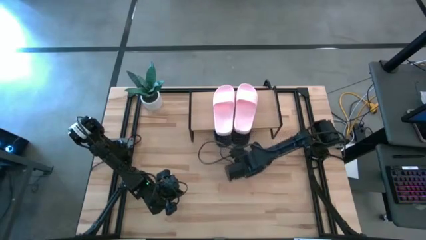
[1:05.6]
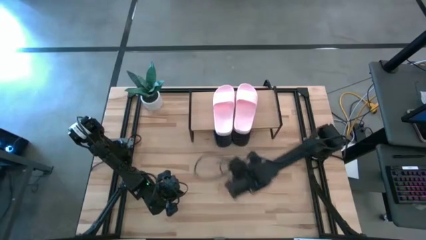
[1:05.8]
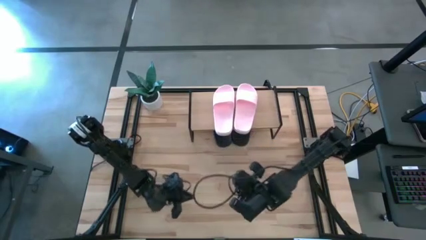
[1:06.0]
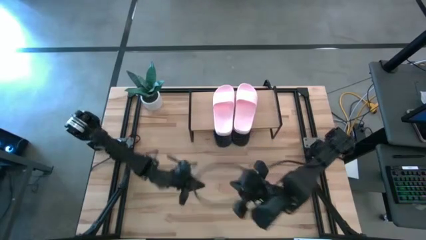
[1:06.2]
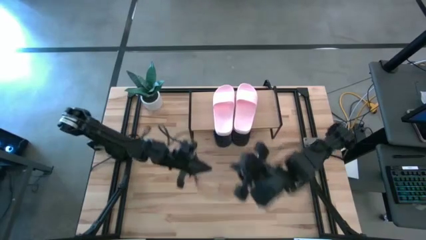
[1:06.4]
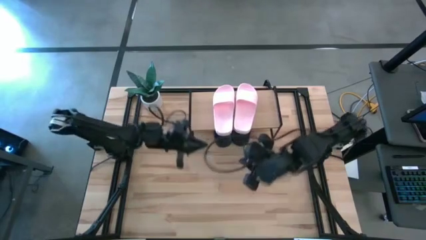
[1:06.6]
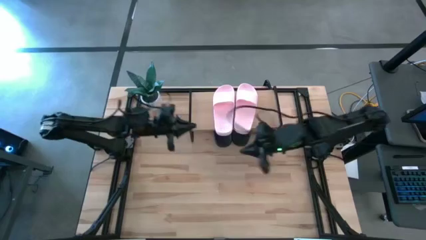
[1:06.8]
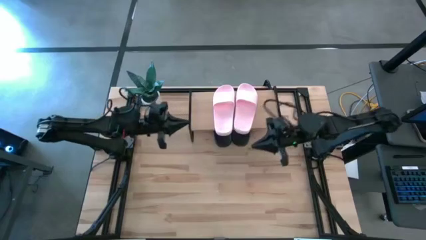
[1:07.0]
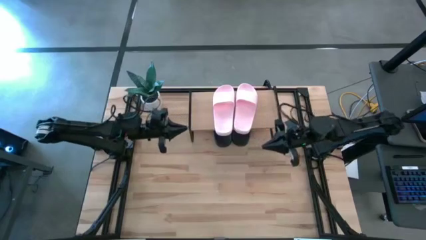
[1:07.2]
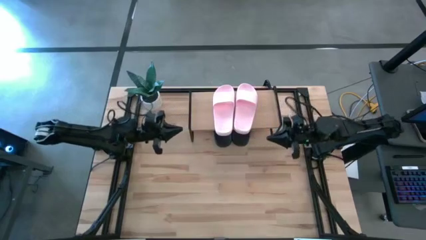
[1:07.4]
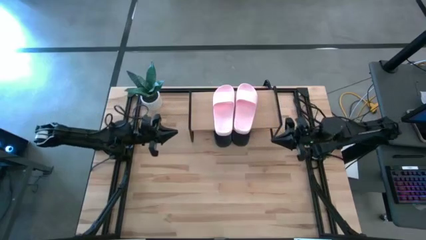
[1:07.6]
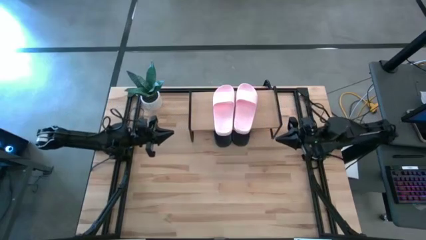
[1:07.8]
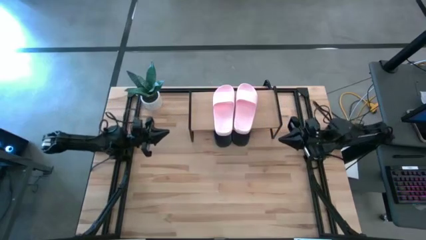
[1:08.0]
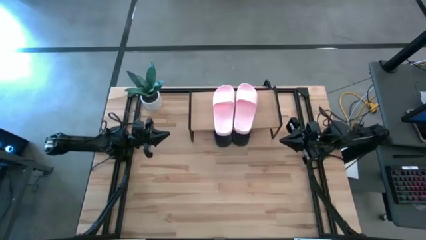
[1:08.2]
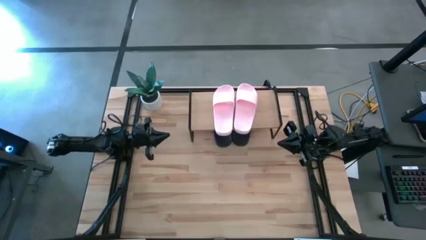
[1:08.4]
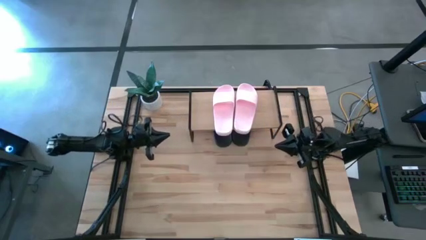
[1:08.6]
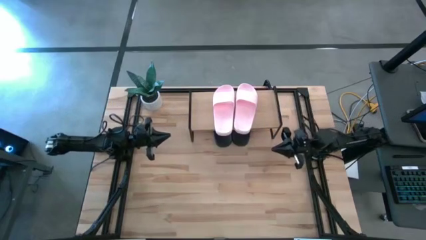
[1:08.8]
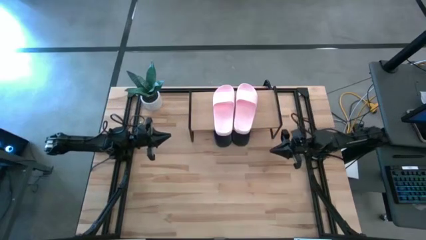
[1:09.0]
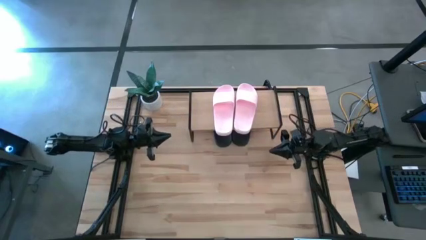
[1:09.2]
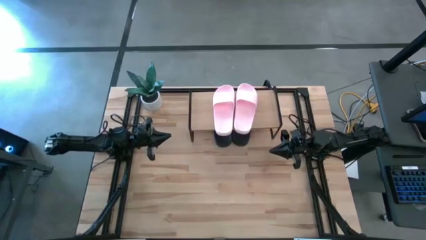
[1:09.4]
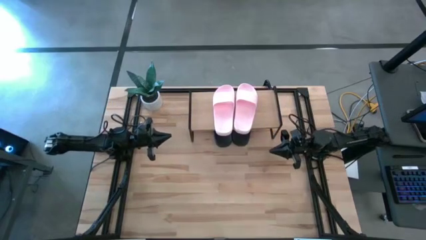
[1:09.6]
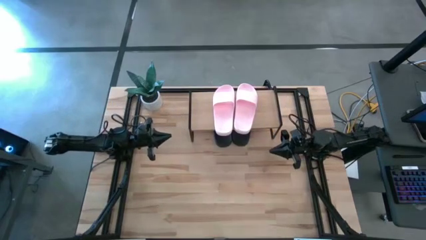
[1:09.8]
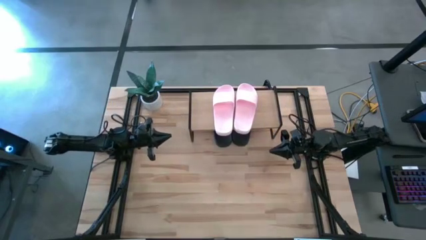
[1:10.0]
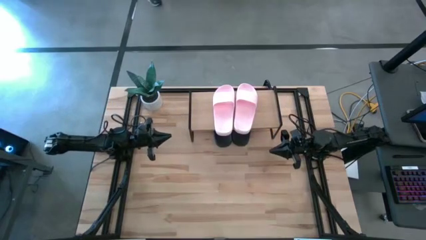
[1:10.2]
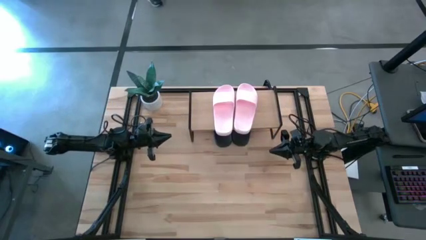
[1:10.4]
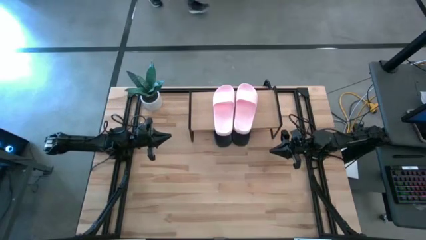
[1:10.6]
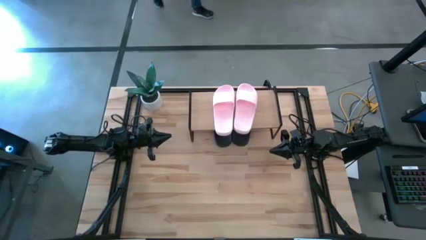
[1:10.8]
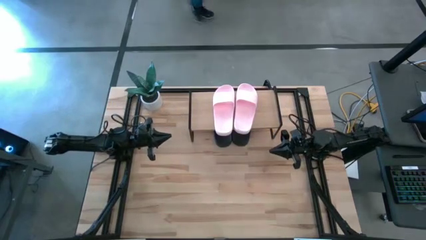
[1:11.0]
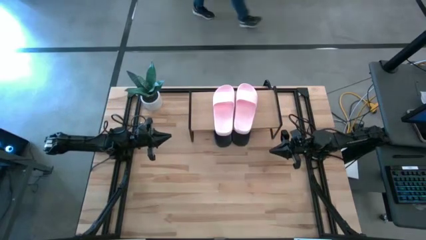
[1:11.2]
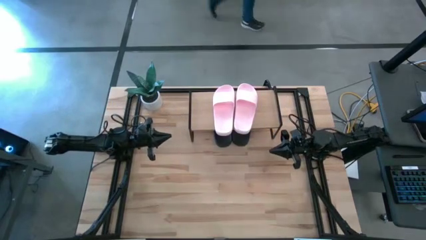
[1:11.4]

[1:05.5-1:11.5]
Task: Pick and place slides into the shelf
Return to Home Position

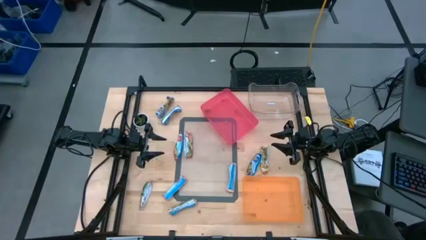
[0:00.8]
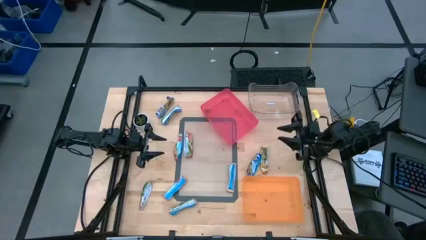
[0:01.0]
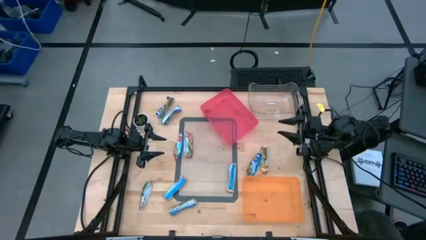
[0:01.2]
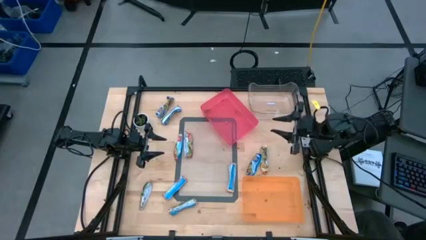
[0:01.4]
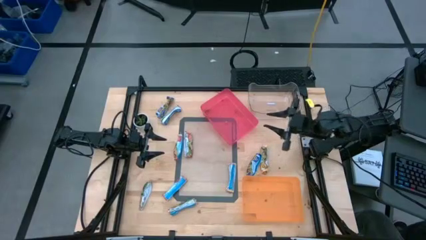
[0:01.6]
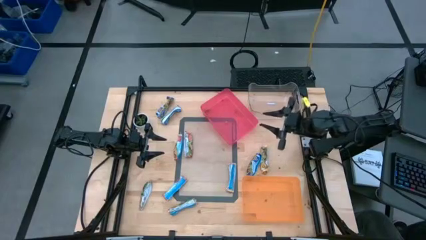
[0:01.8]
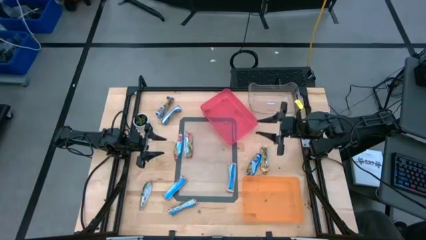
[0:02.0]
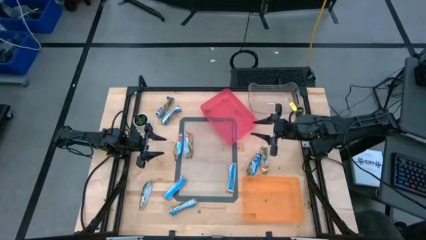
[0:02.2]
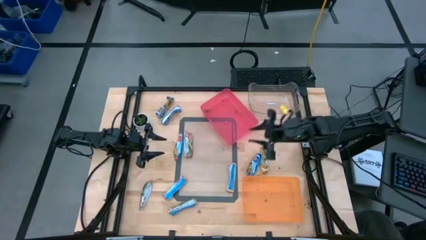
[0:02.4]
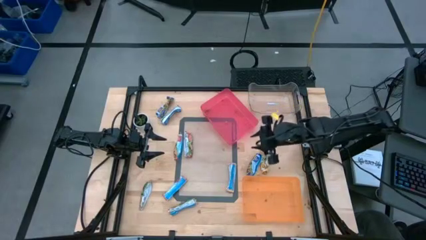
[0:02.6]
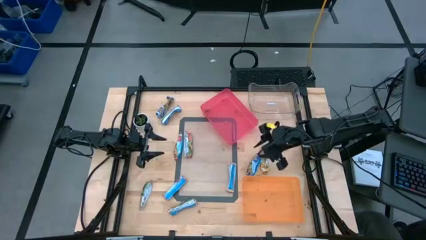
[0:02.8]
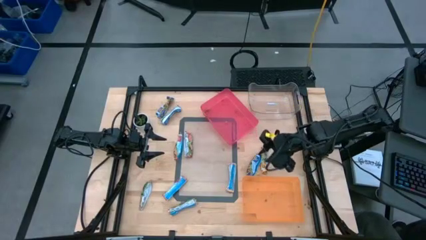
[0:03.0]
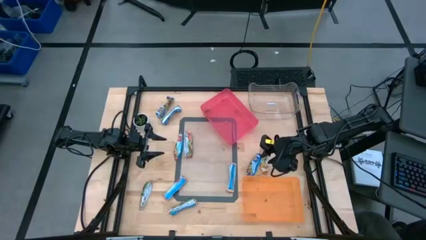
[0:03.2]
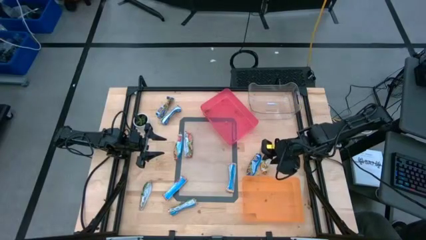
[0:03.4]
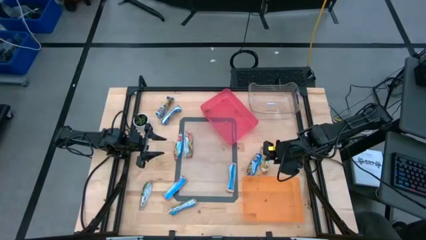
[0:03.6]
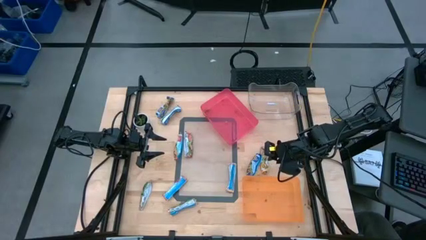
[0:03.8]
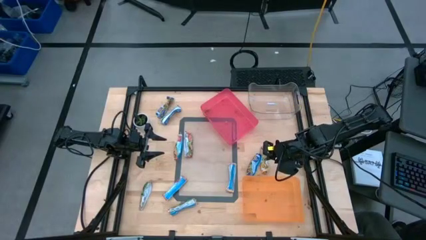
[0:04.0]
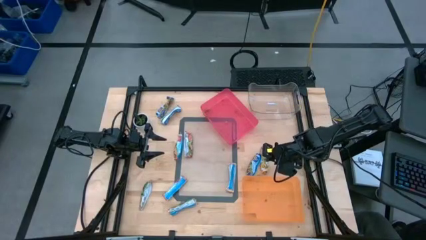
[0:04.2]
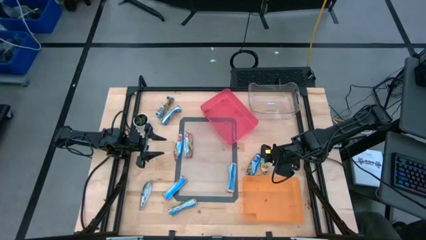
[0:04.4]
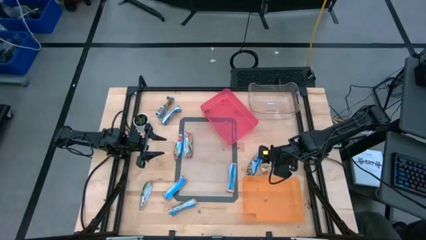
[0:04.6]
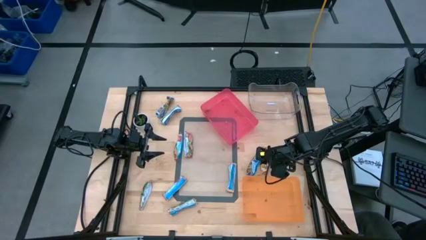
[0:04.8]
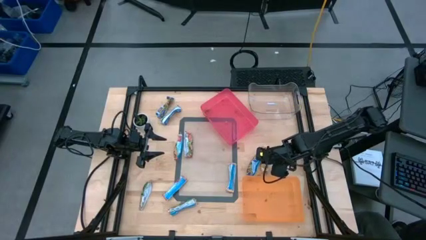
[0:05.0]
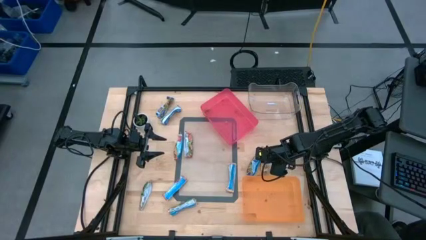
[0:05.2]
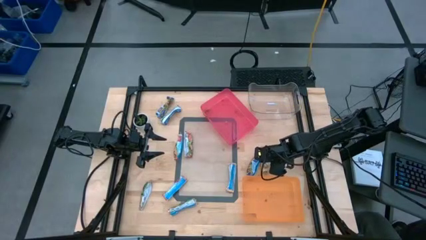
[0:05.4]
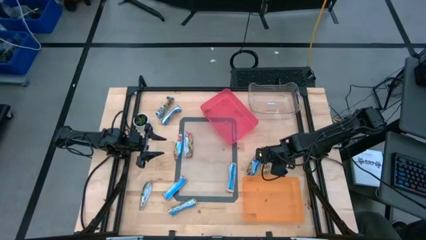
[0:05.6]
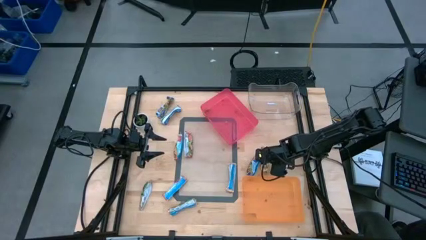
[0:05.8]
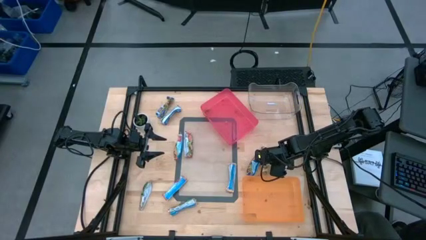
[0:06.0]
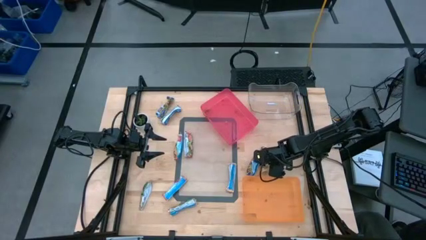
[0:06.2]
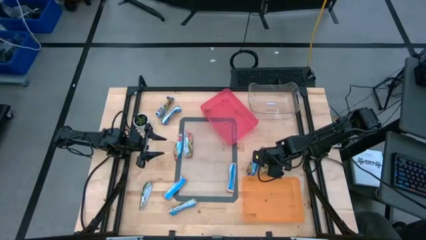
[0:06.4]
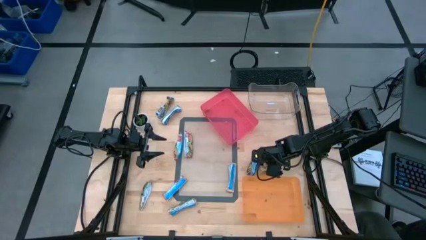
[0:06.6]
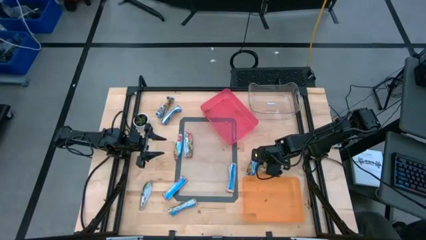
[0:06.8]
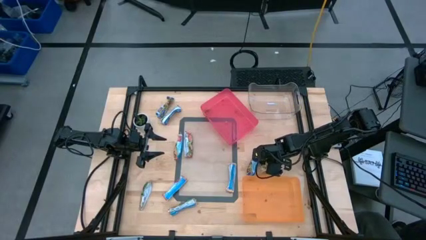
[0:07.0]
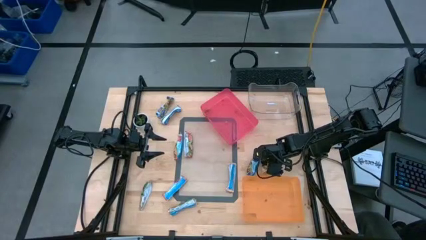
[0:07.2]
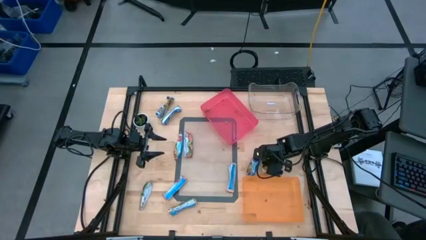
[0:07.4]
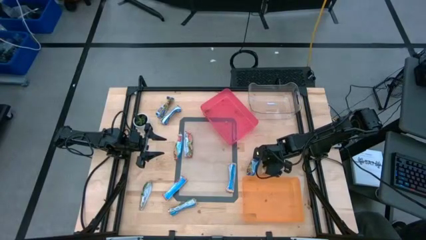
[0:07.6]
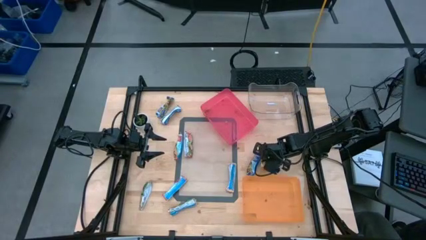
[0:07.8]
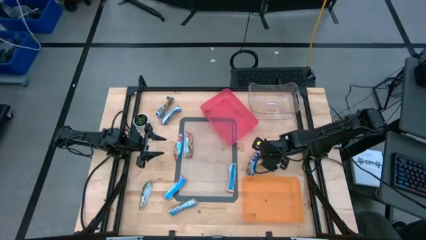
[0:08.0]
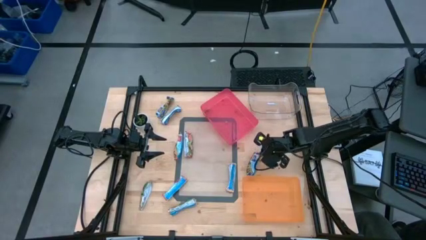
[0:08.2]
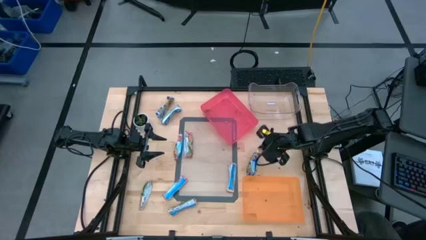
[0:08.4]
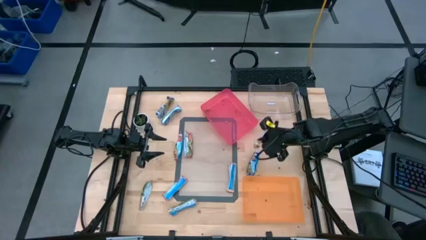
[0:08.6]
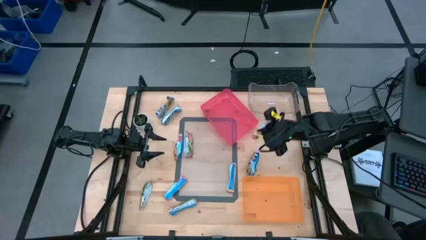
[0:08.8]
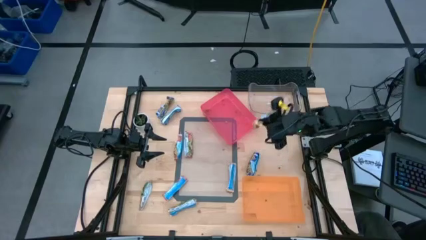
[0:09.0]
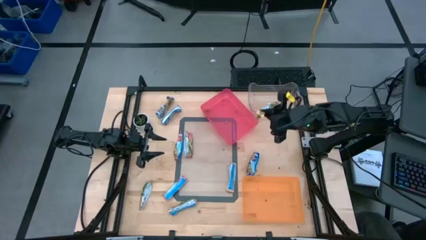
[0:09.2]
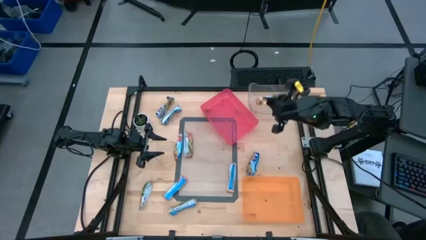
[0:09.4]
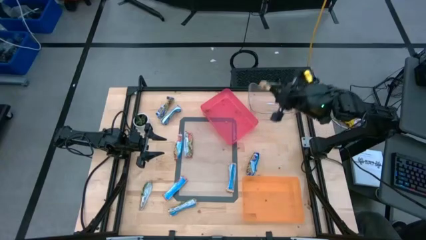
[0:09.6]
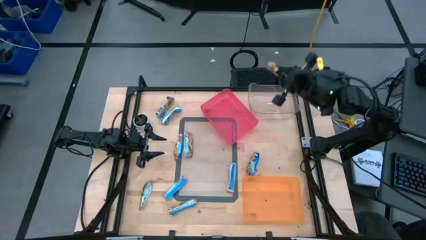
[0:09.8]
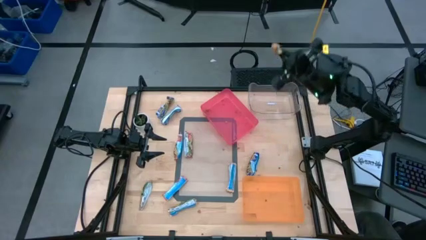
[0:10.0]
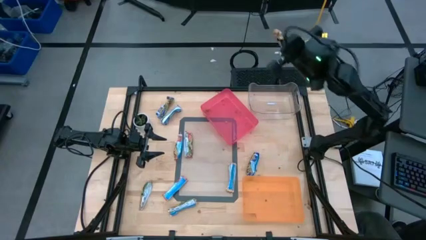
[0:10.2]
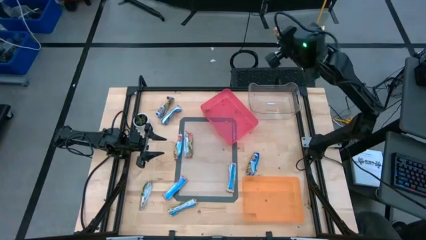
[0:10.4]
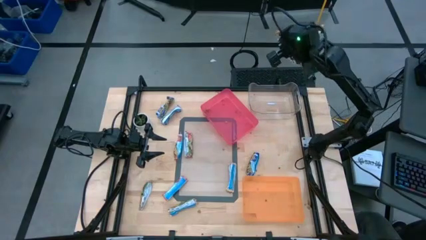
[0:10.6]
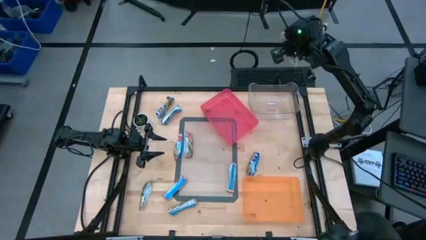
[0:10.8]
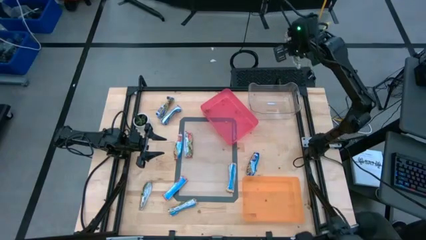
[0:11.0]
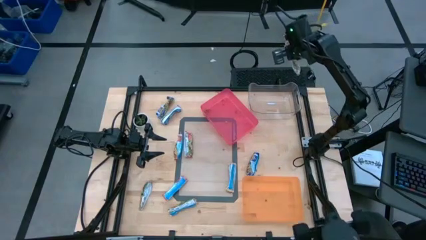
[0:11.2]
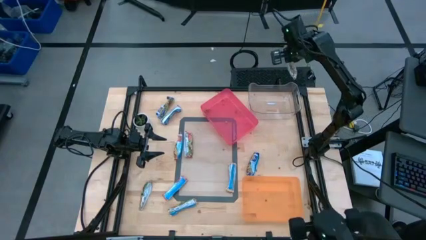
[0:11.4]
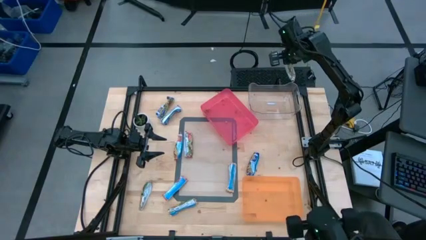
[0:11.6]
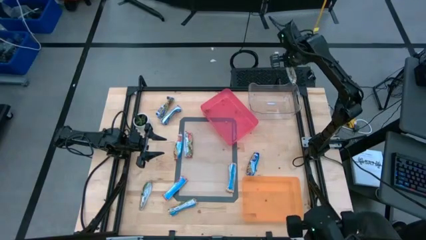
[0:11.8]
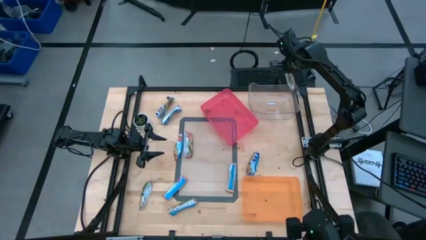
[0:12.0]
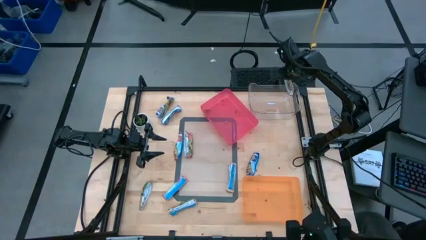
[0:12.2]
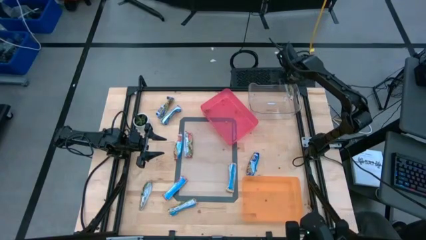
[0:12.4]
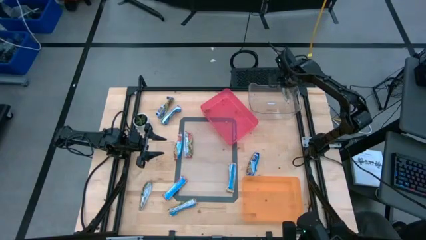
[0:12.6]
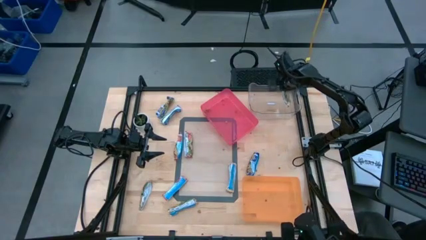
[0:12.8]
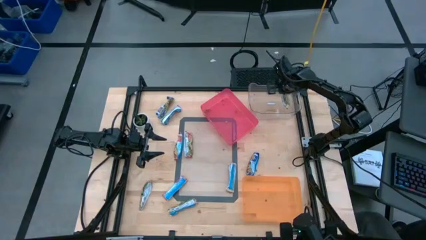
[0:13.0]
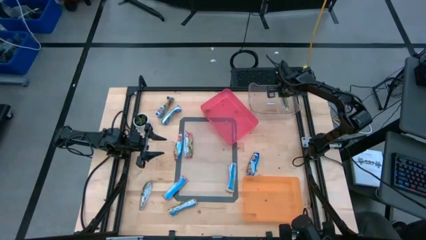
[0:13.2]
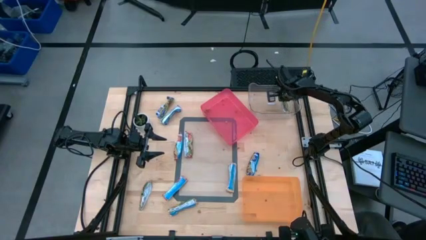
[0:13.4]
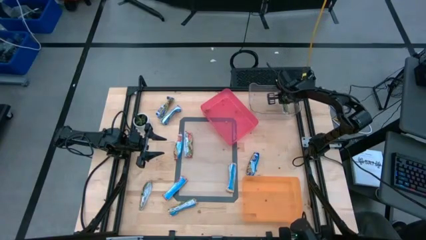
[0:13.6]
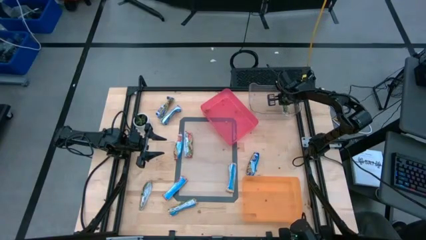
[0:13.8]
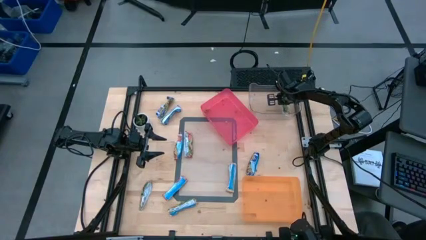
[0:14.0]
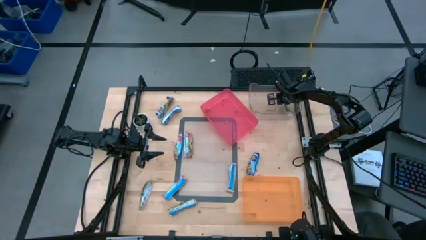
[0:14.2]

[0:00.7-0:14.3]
Task: Pick and place Granola Bars by type
Put the yellow granola bar into the transparent bin
